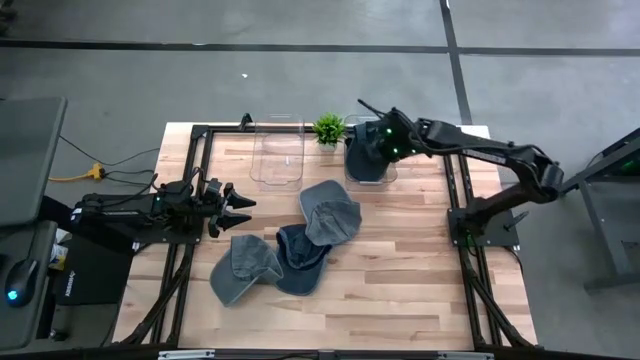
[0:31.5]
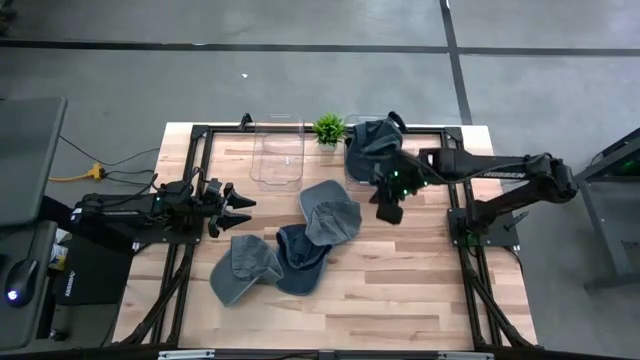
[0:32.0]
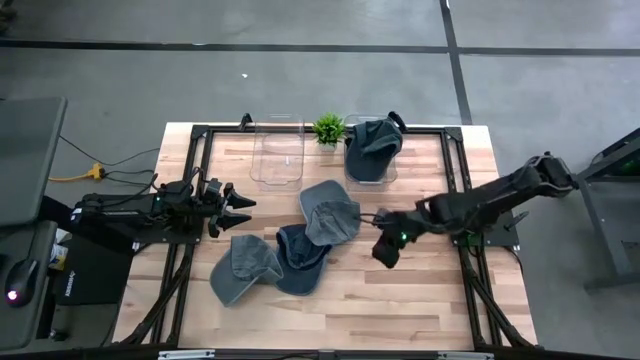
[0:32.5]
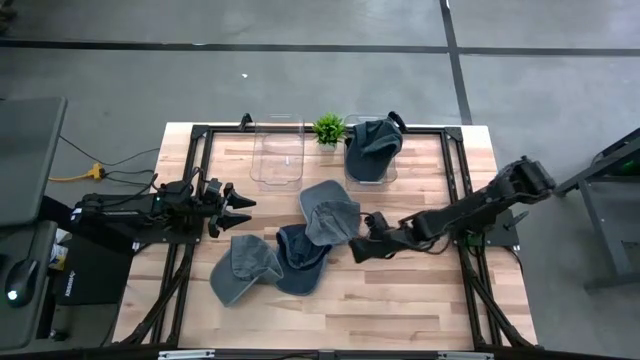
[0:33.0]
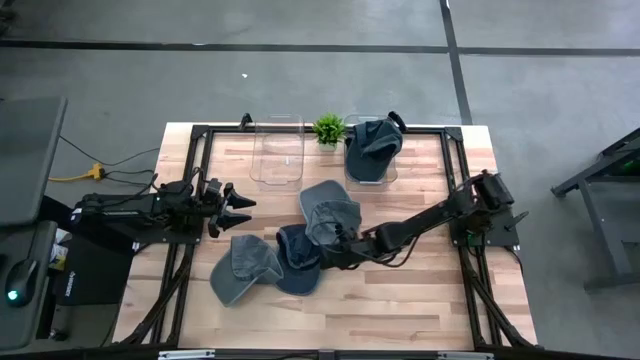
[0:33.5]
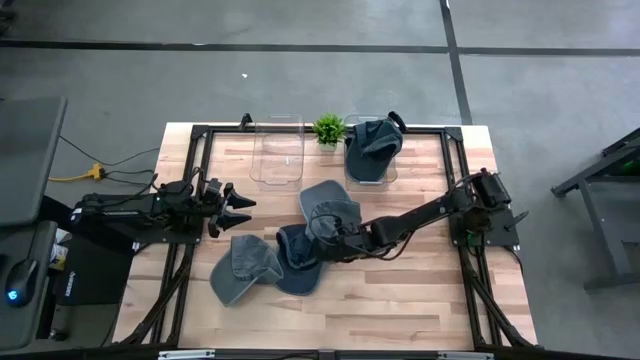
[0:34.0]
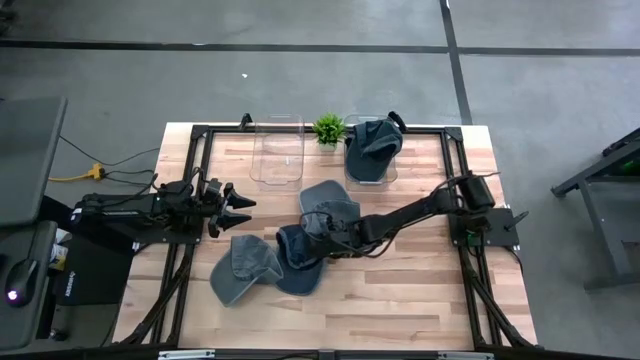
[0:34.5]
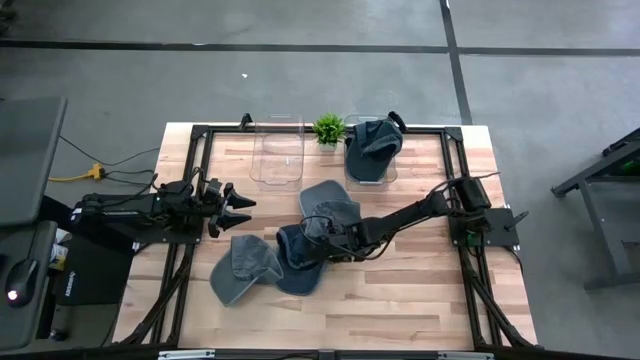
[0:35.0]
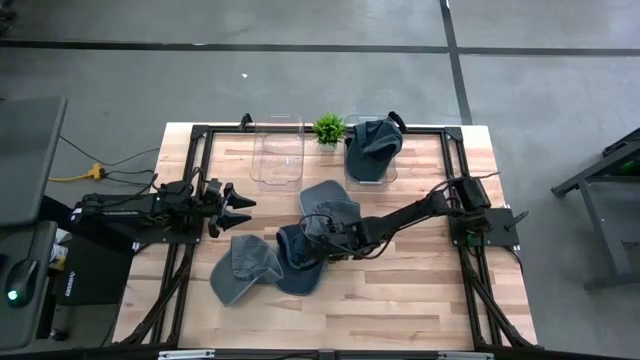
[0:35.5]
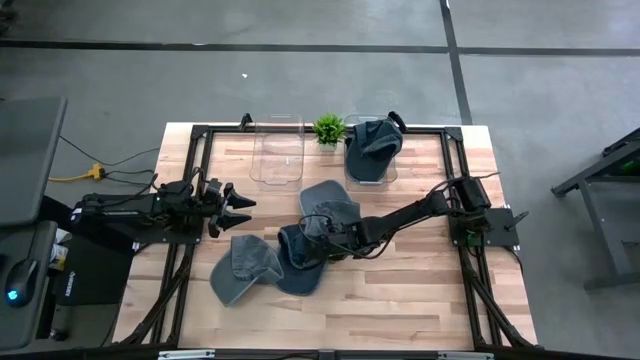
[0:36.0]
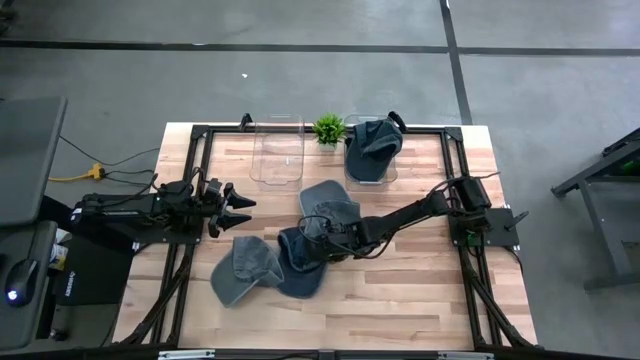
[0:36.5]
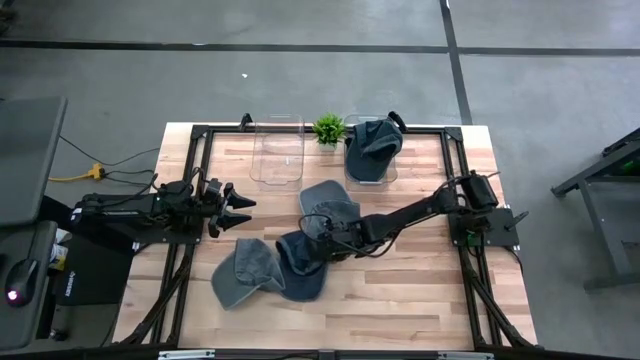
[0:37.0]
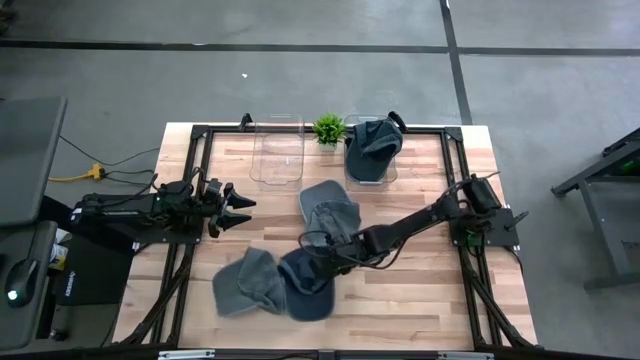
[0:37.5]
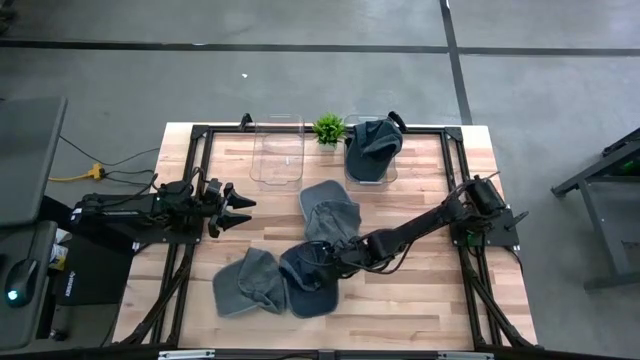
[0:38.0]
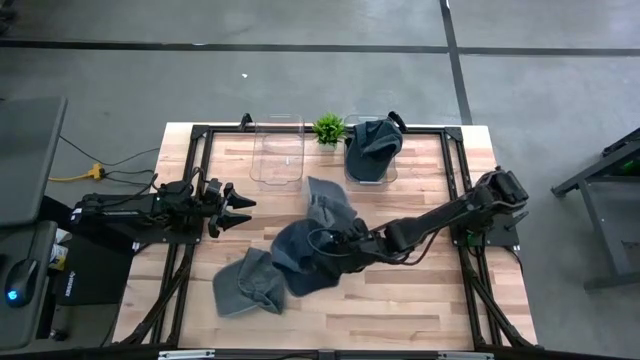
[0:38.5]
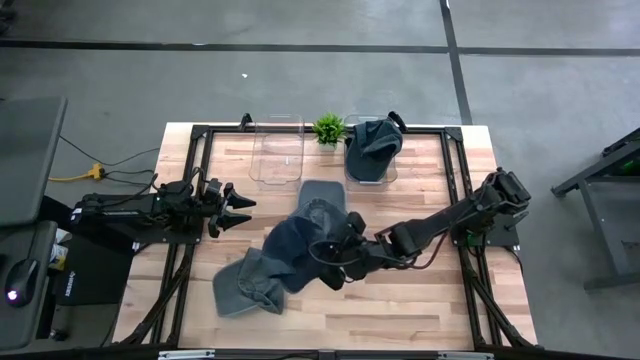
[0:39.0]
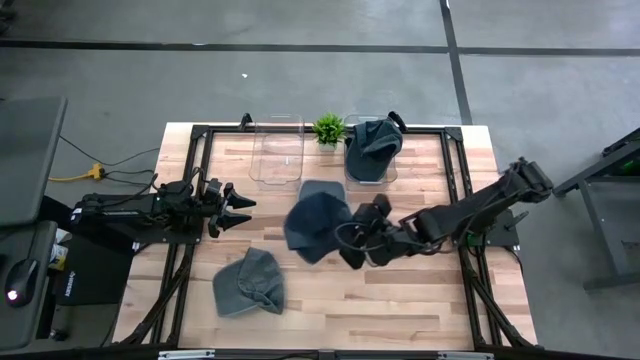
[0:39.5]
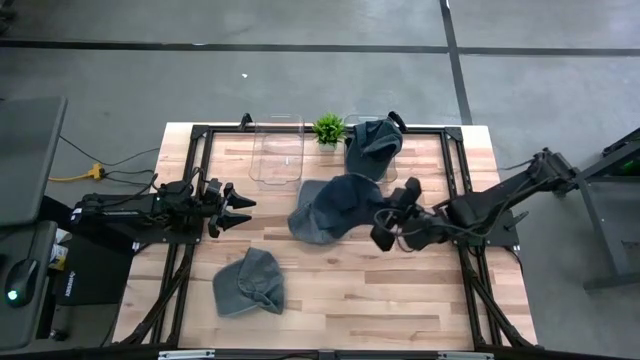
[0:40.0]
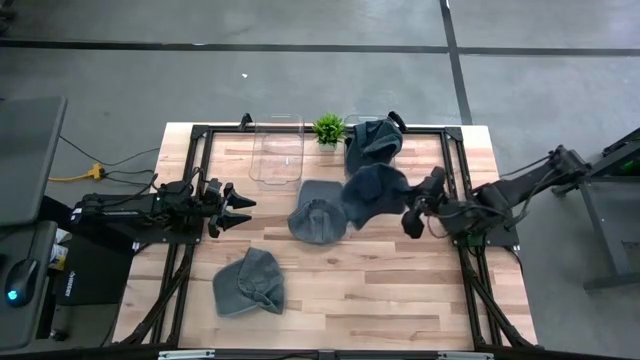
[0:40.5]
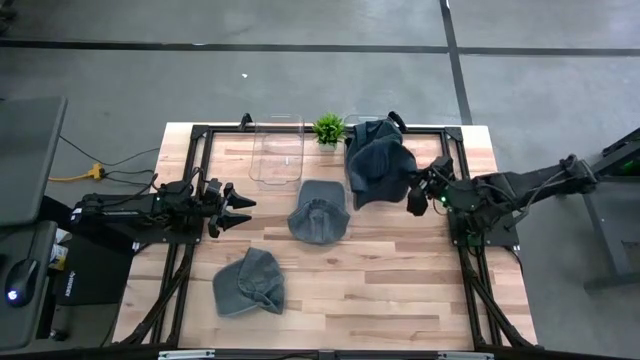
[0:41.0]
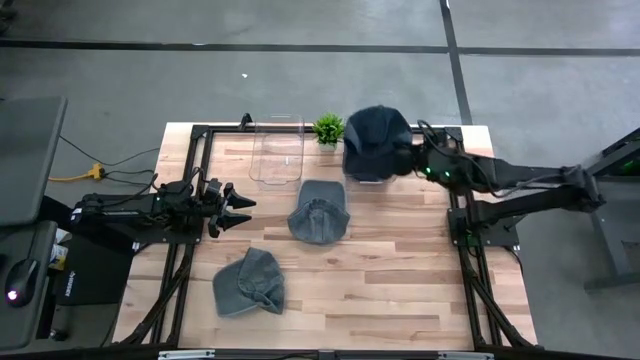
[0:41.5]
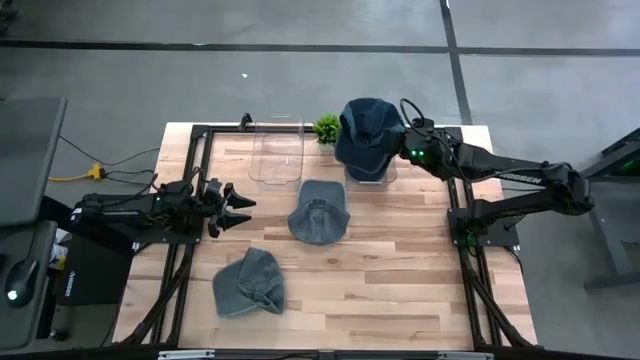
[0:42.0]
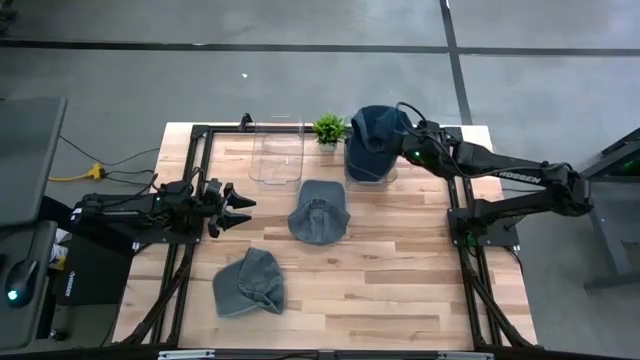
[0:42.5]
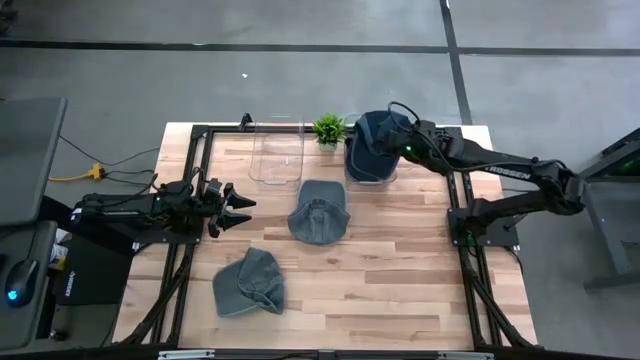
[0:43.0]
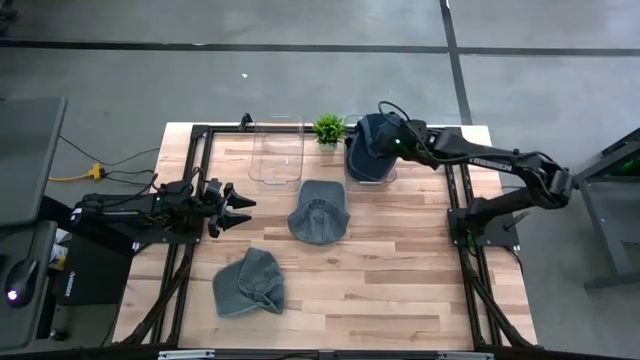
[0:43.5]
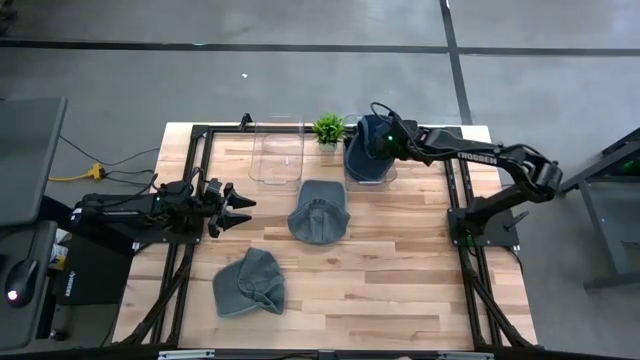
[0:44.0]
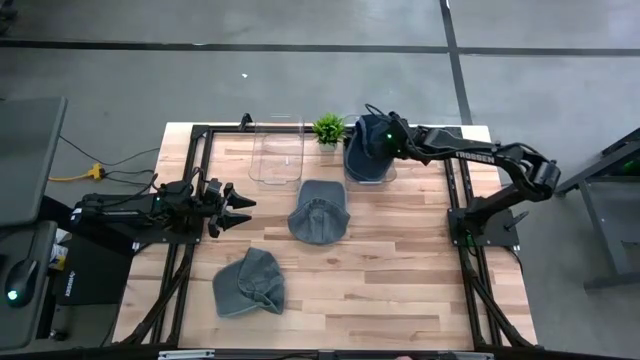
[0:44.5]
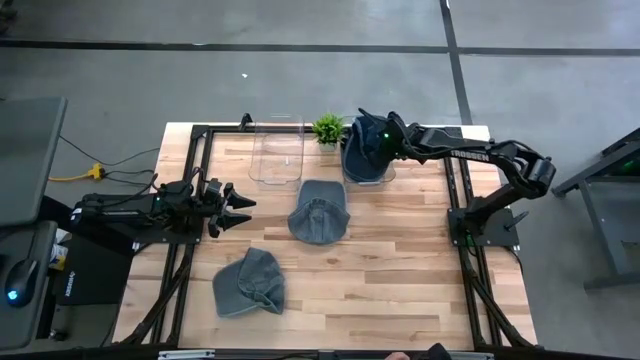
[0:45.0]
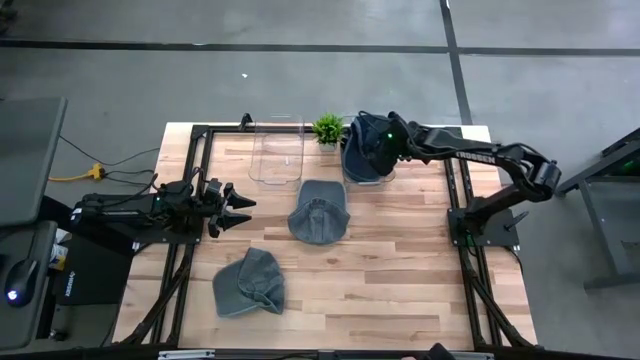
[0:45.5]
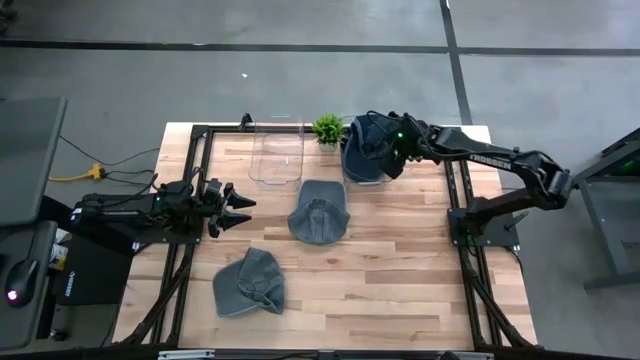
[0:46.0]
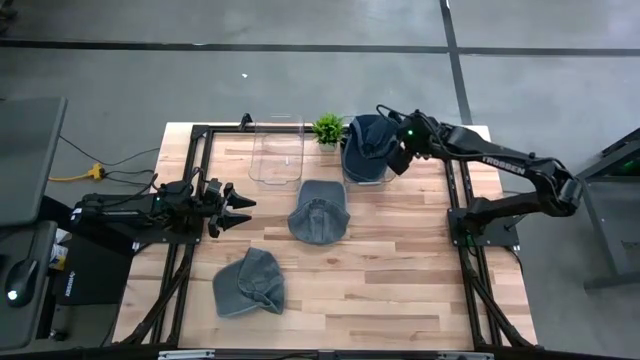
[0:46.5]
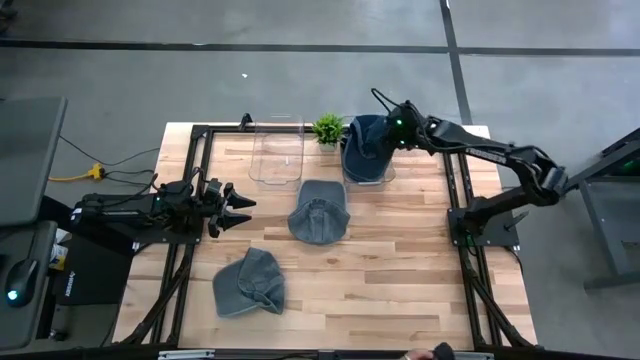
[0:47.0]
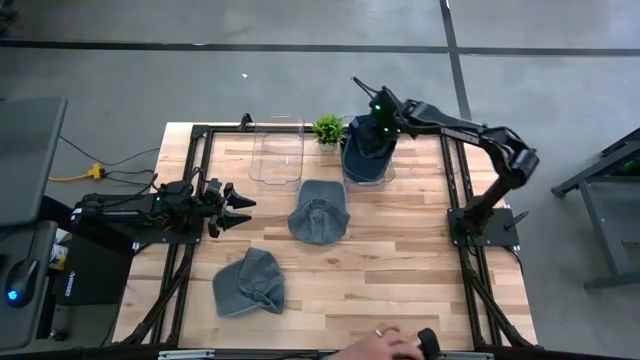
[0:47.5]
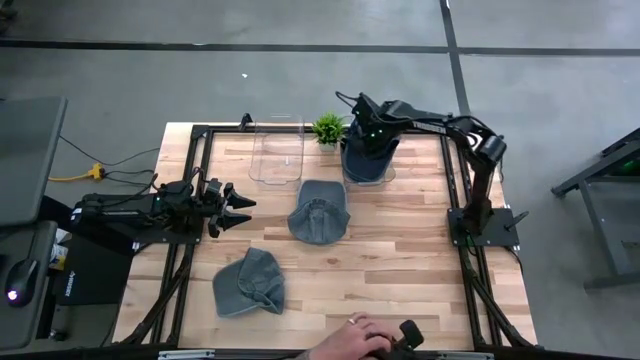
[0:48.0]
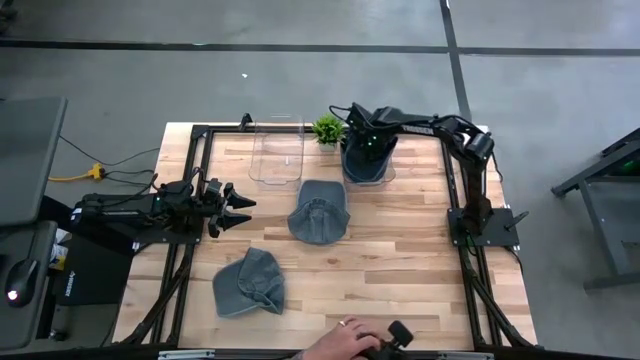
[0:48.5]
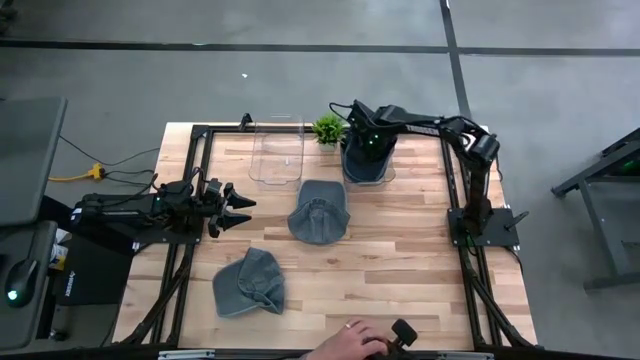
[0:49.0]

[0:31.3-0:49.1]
Task: Pick & Place hat
Put the blue cap into the right transparent bin

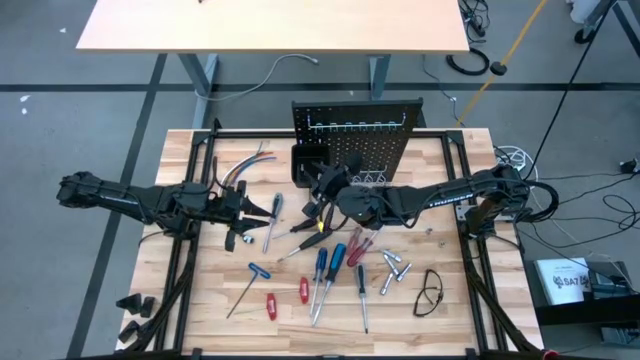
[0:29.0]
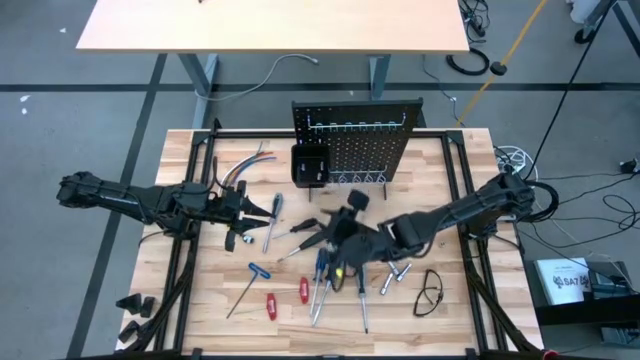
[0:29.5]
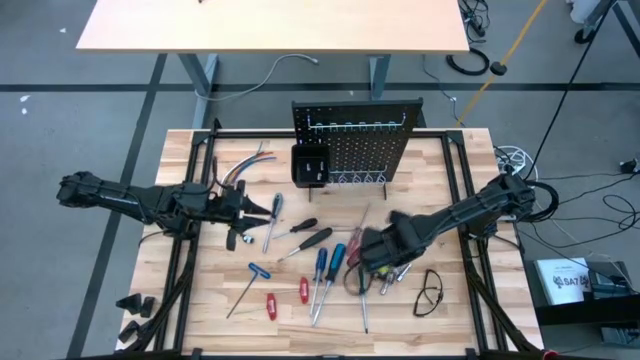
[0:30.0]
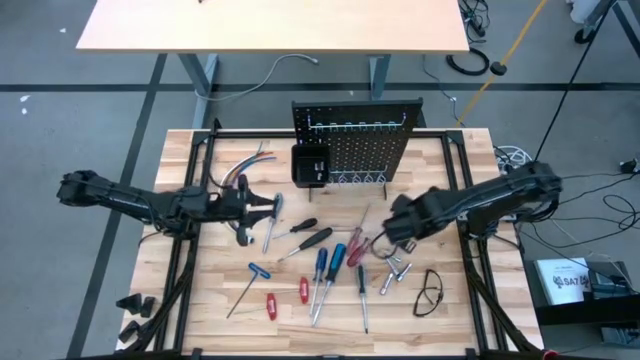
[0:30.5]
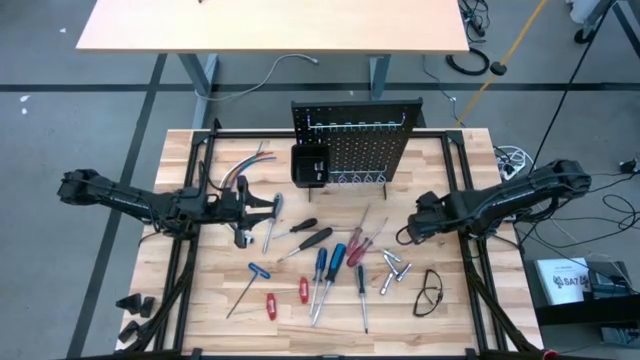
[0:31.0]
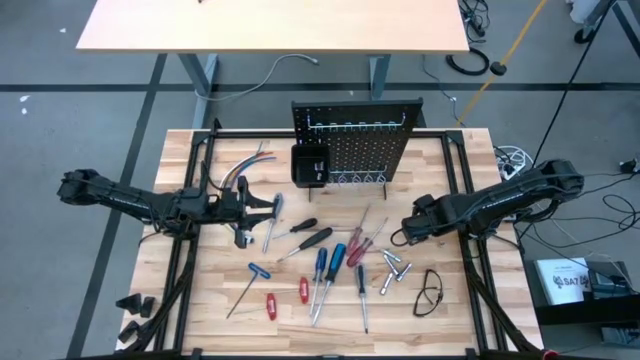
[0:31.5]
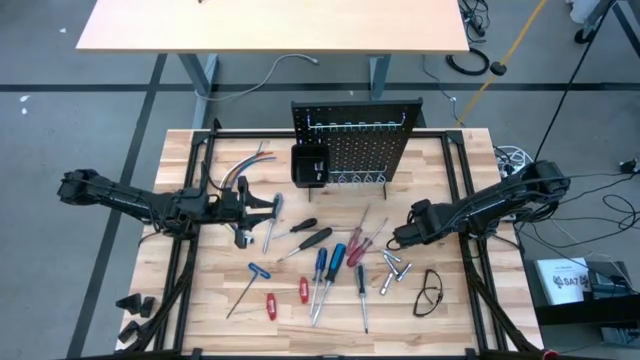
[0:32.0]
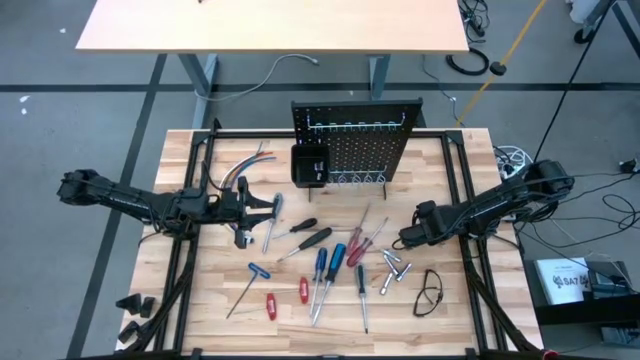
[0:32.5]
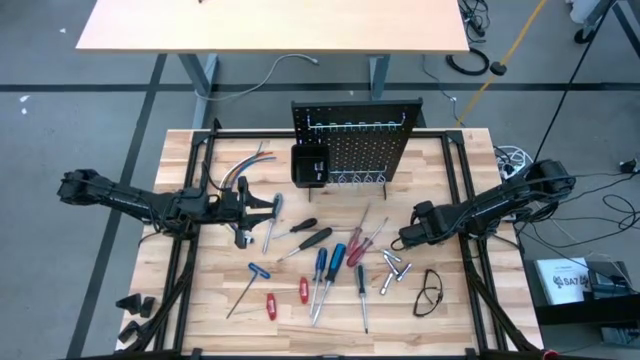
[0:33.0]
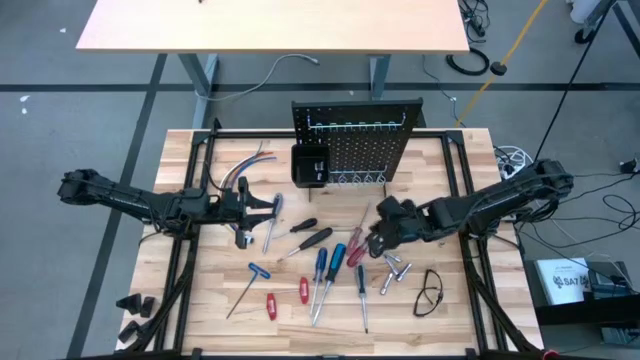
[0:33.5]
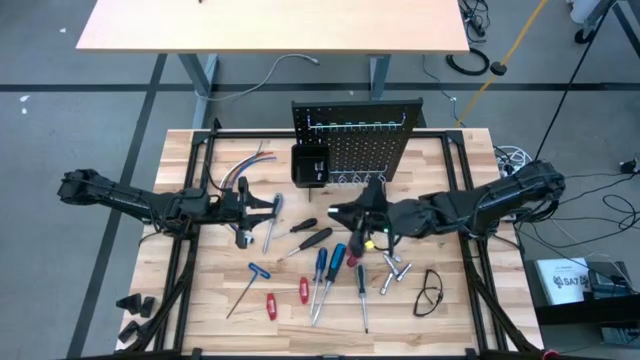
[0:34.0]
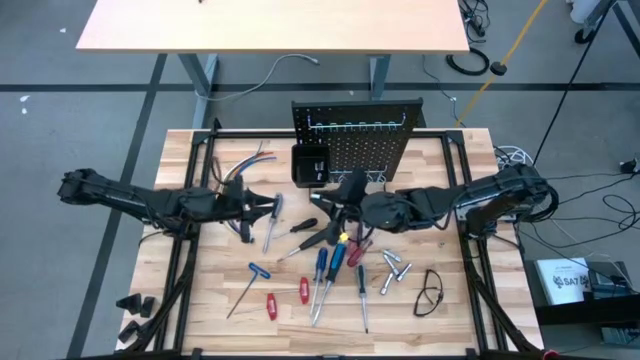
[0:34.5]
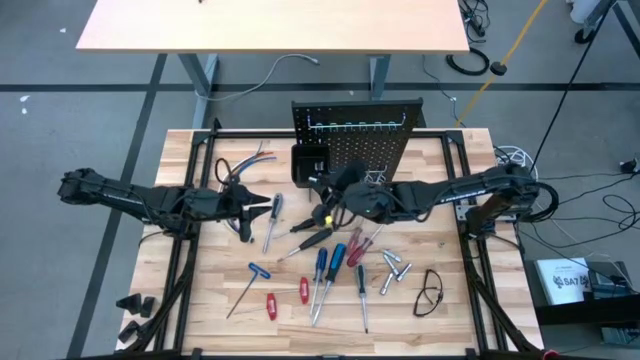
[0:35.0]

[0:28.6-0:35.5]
Task: Hang tools onto peg board
Put the socket in the black bin on the peg board
